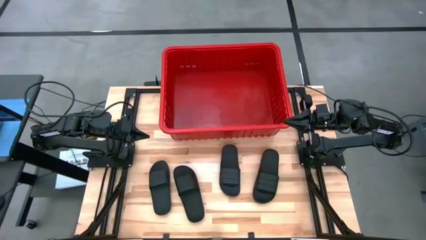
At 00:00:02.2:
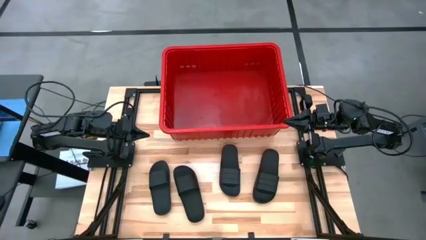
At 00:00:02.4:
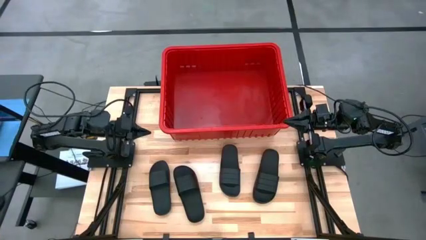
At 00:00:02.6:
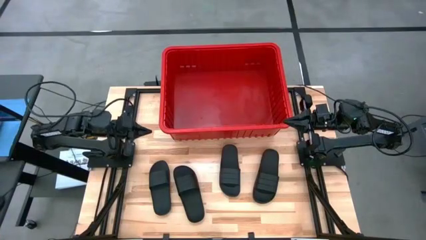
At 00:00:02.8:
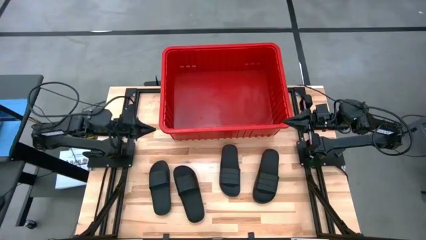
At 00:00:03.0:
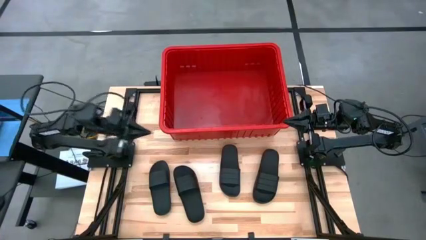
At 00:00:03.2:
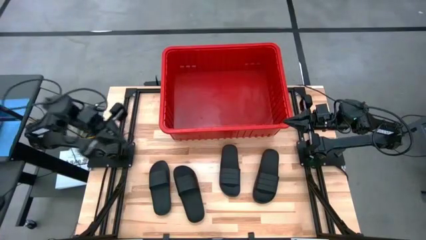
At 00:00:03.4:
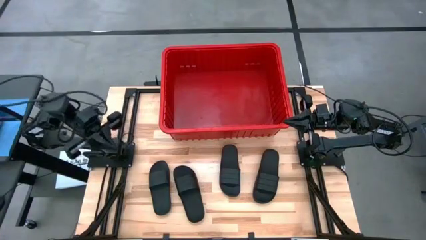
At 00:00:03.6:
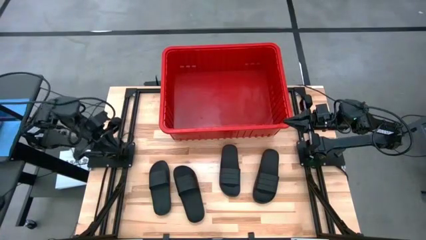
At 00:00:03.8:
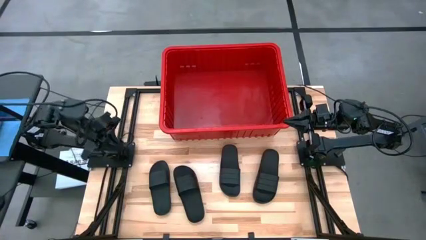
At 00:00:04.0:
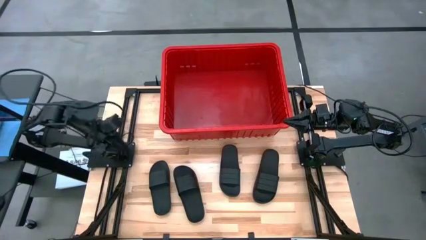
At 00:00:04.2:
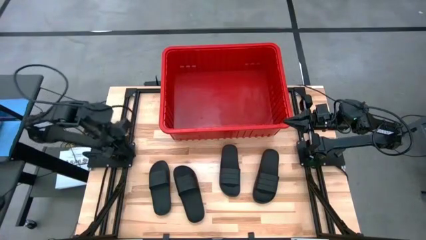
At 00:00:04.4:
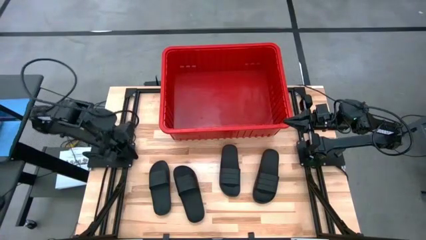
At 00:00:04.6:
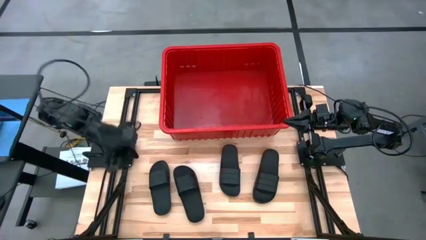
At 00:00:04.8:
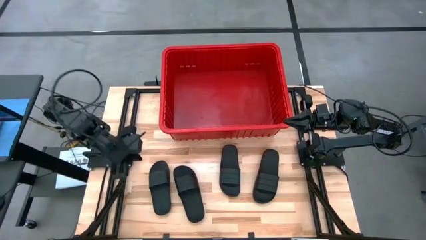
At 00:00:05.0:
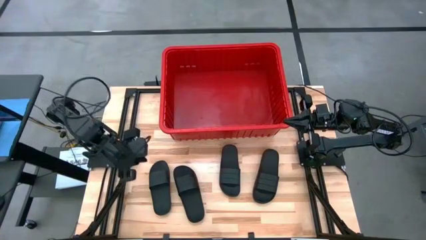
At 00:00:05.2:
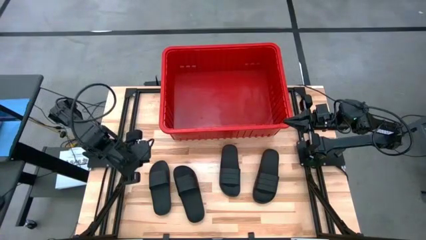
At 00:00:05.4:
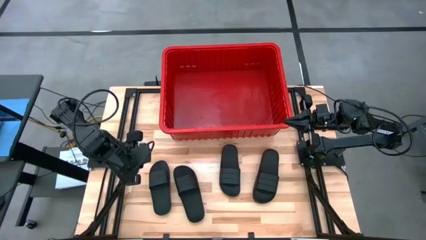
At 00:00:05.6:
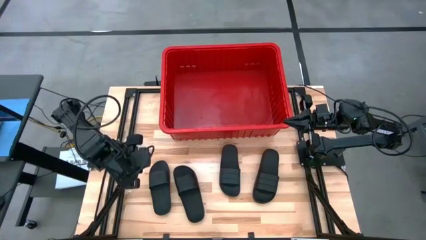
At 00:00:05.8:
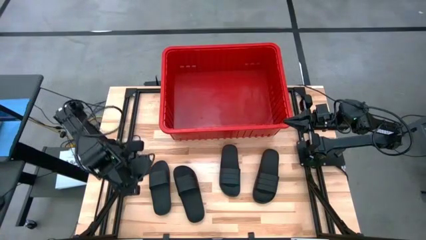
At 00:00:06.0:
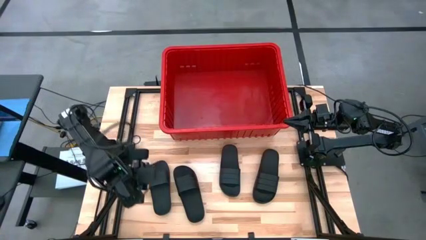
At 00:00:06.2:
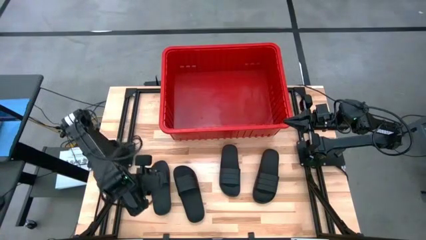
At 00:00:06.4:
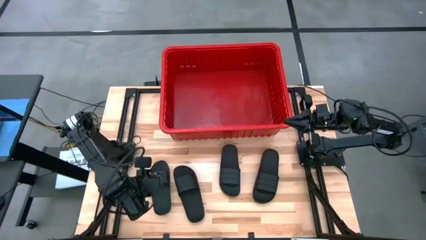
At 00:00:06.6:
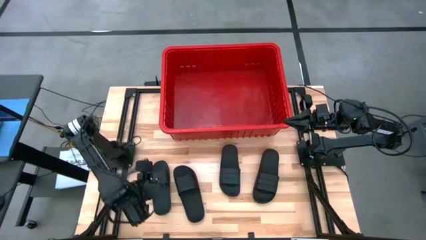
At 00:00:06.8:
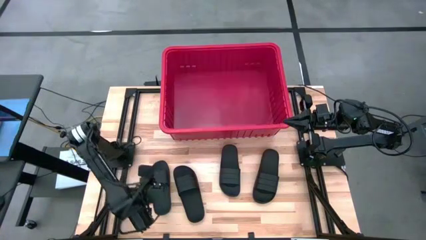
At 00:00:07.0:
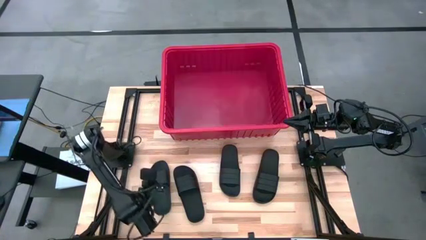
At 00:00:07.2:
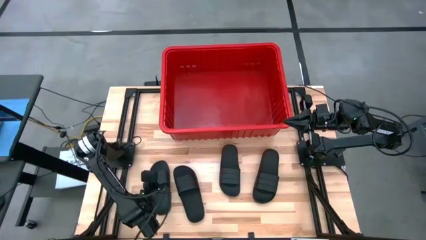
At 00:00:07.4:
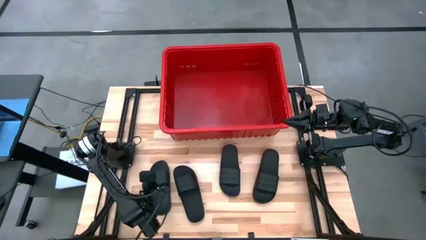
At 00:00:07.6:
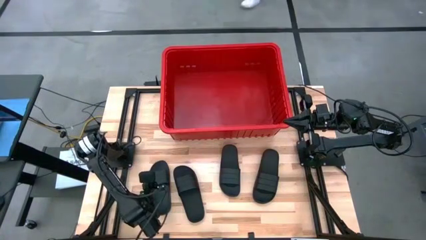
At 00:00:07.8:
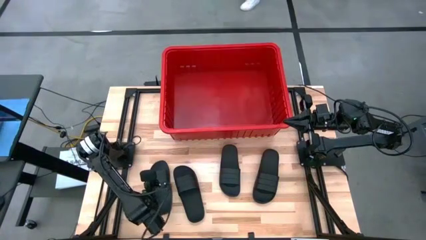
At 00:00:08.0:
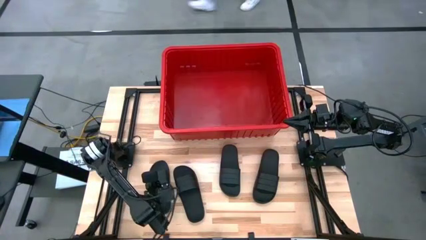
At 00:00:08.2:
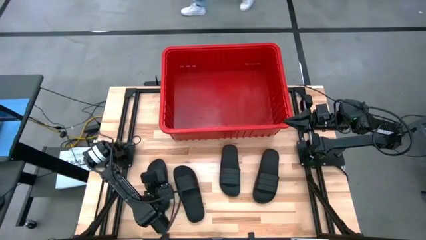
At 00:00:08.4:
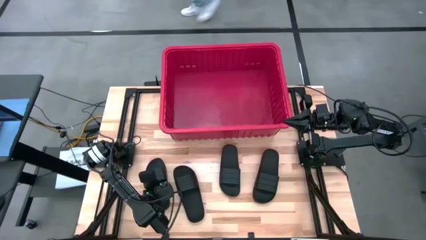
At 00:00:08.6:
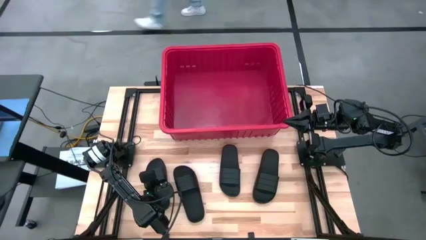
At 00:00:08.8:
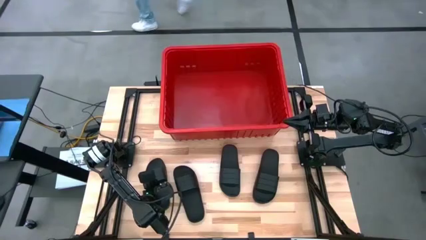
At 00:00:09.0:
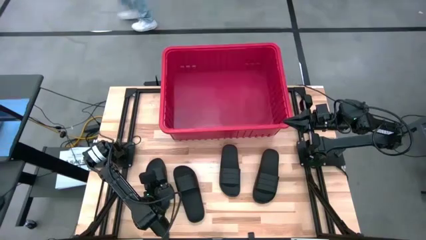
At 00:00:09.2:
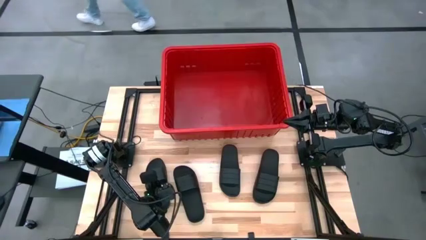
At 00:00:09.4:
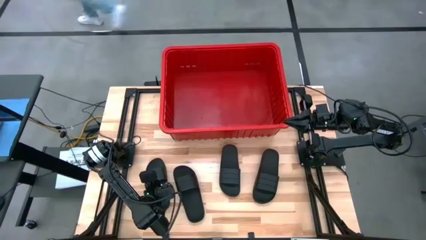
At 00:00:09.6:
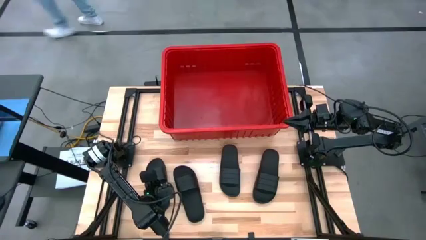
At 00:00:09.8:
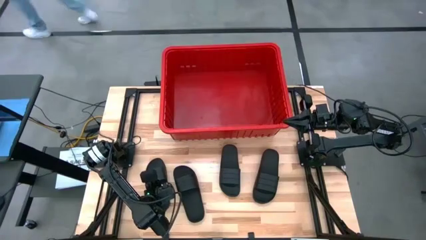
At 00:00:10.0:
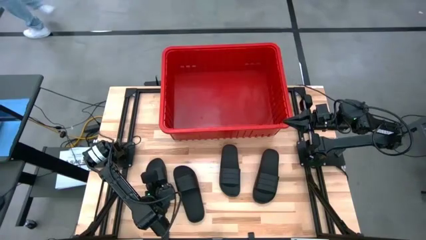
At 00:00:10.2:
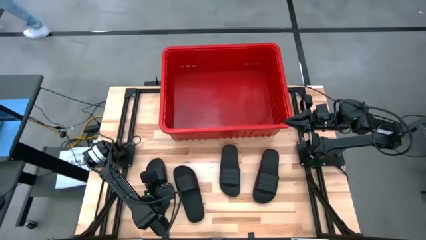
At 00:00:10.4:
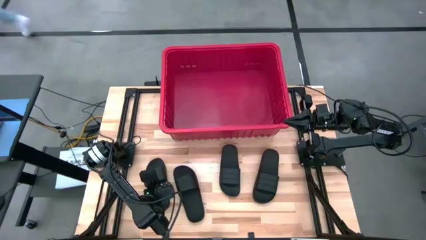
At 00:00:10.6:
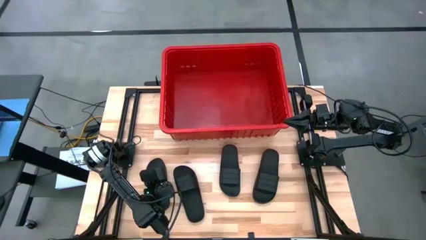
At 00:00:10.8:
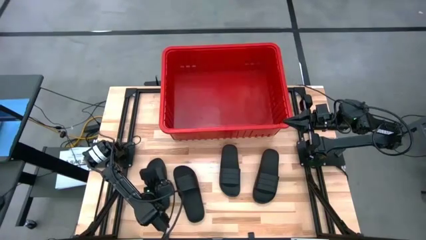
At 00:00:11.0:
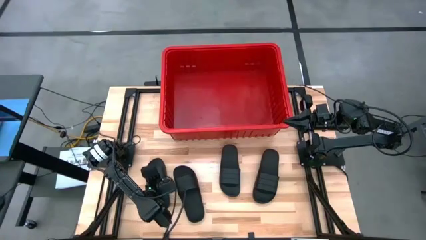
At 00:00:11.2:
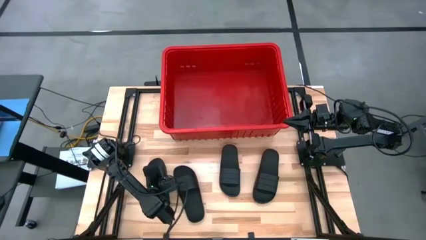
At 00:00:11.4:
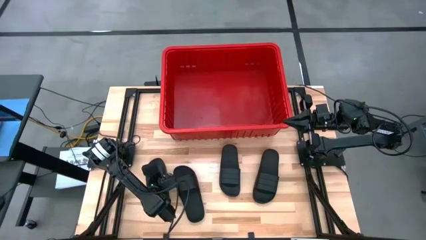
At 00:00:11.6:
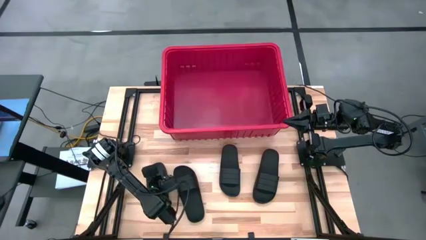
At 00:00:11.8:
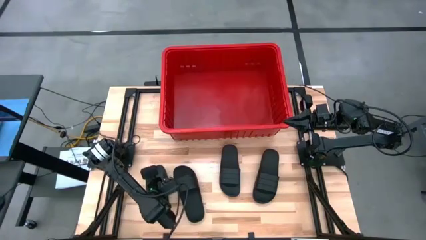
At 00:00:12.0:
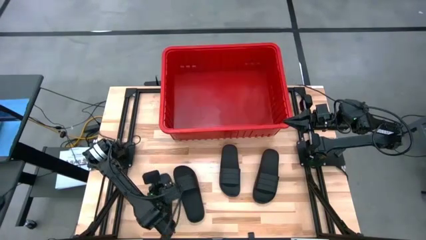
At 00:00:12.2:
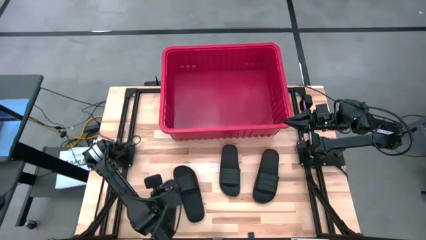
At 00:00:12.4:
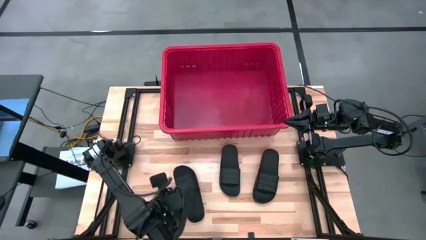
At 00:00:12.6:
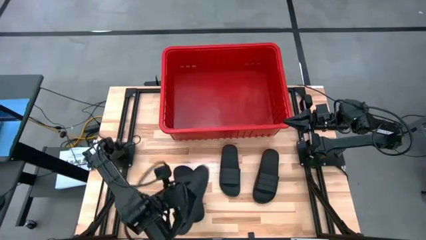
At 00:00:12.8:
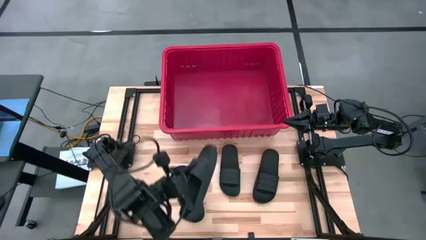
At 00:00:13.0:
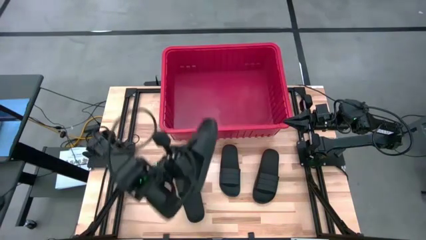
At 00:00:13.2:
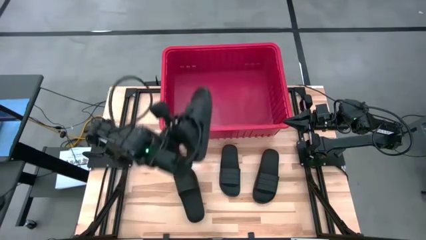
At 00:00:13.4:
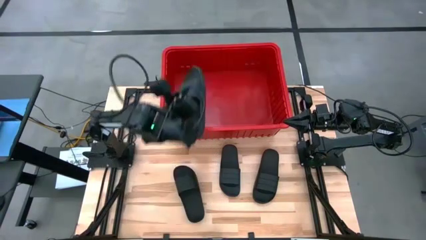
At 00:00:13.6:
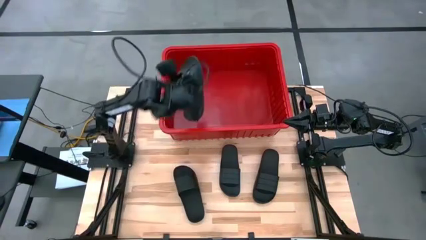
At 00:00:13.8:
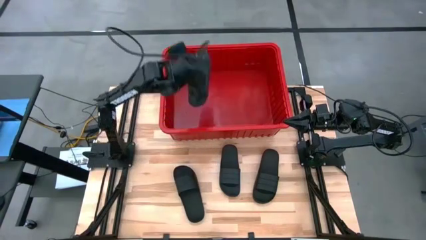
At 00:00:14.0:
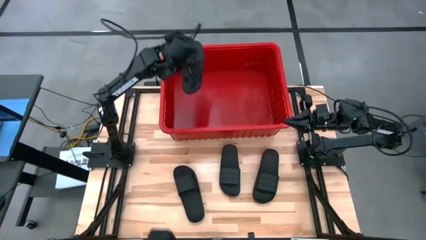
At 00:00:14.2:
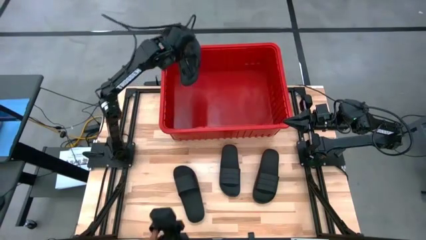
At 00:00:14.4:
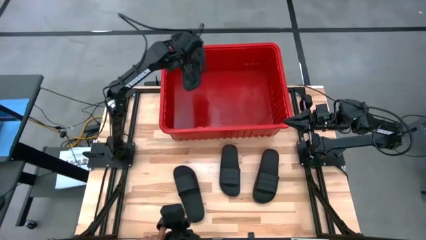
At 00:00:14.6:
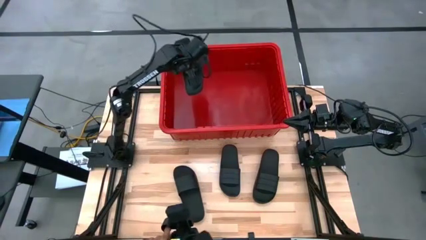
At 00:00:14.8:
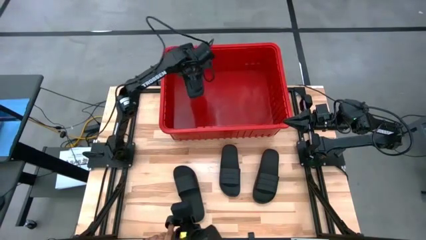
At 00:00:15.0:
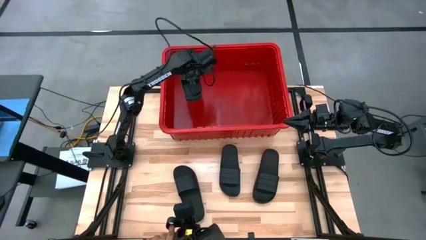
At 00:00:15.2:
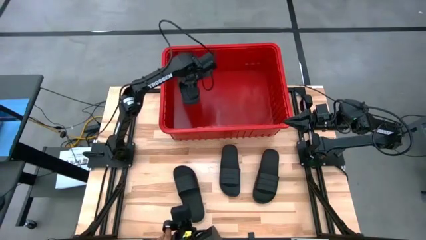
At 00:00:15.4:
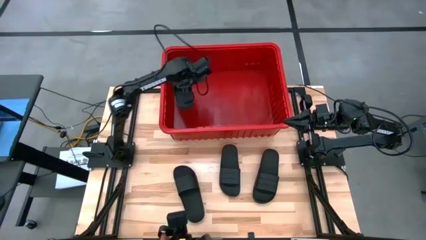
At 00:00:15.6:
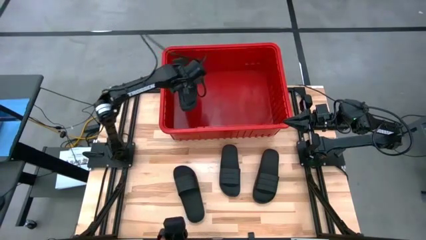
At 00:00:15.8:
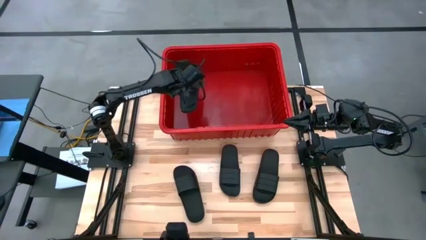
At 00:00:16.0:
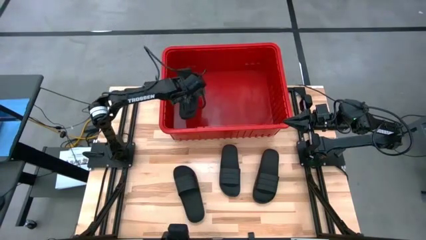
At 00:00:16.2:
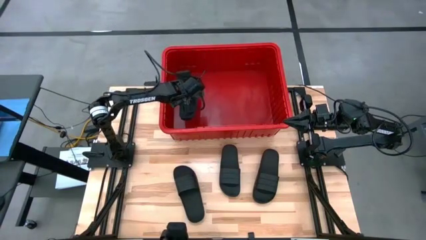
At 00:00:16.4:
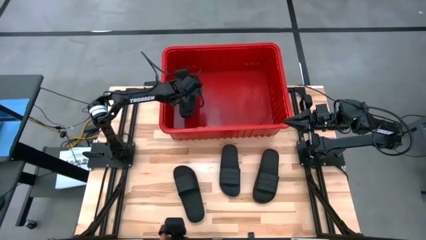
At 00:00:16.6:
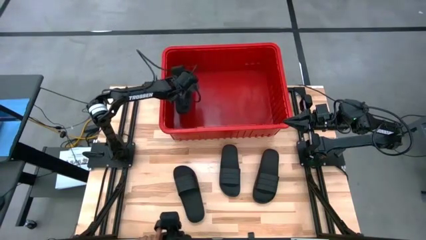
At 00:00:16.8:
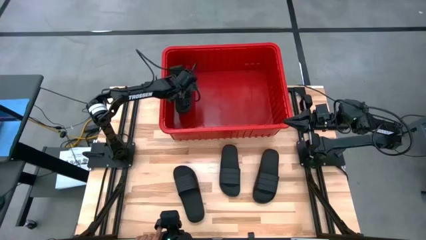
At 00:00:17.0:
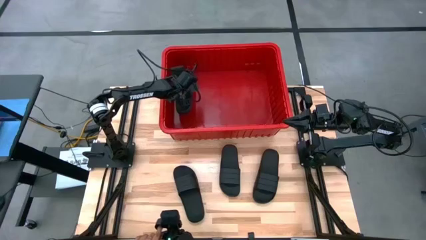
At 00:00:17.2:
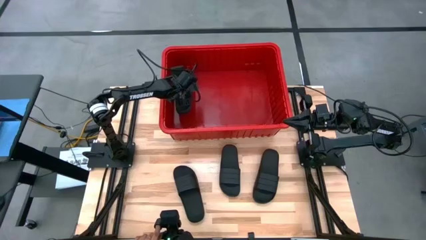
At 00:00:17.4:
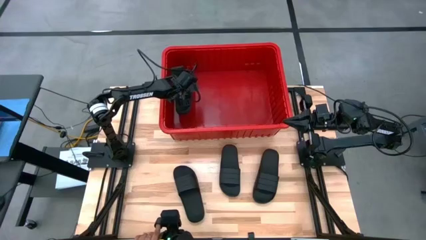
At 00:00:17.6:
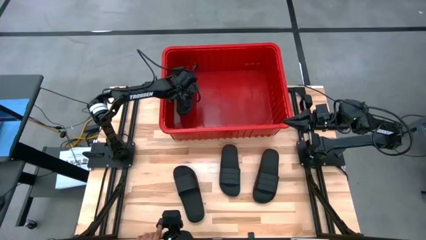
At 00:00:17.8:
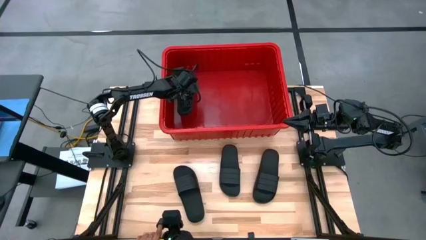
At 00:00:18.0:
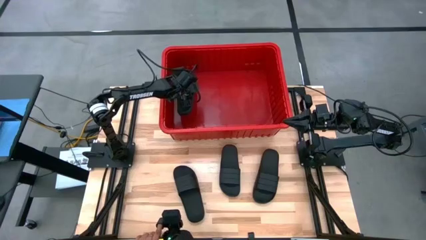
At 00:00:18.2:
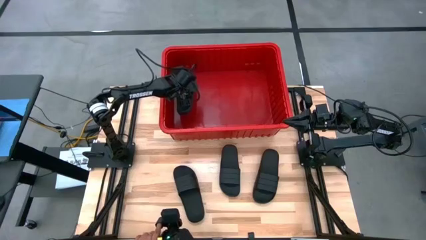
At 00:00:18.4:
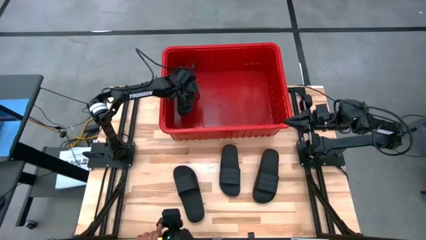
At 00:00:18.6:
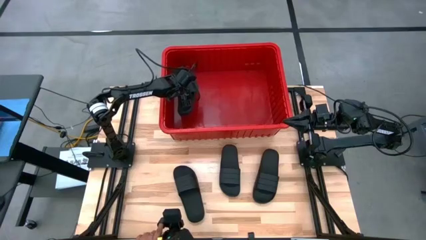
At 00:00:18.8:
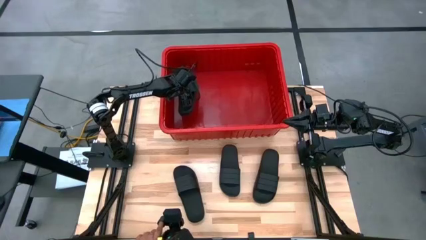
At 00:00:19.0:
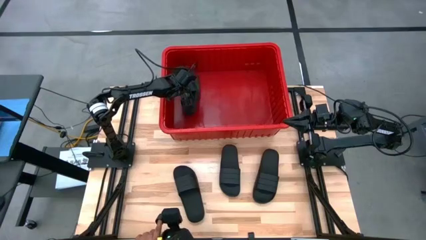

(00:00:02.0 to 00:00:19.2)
Task: Pick and place slides into bin
Put the black slides into the red bin
